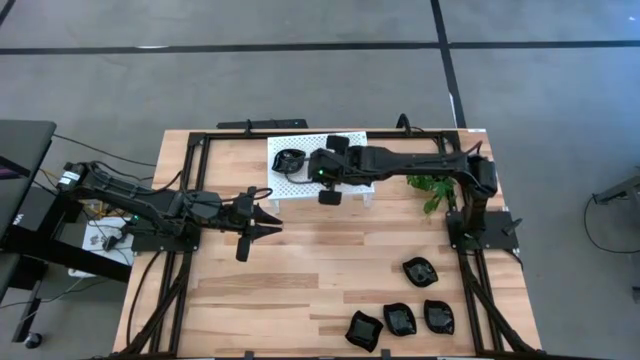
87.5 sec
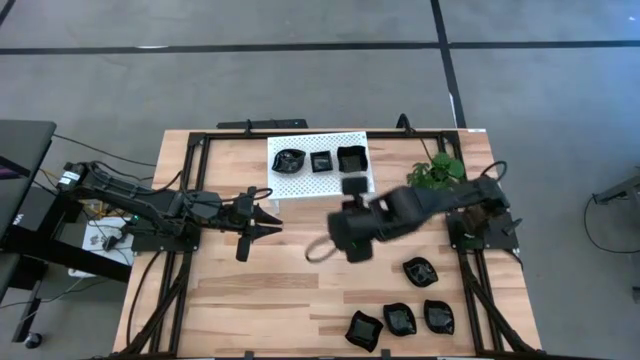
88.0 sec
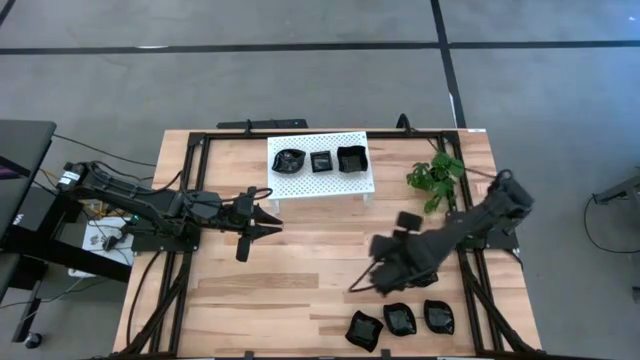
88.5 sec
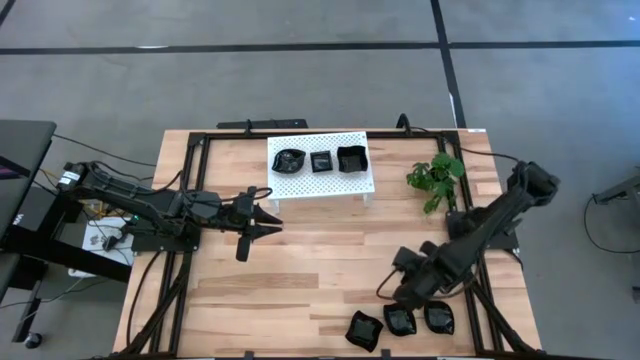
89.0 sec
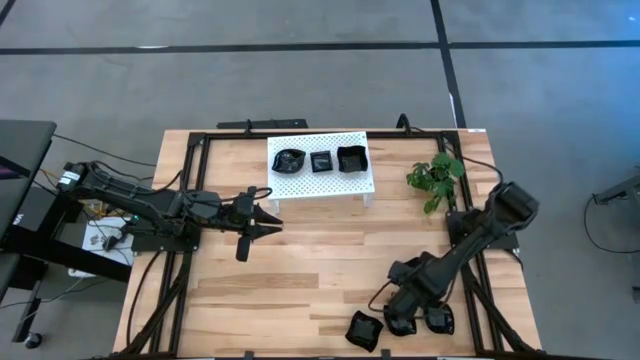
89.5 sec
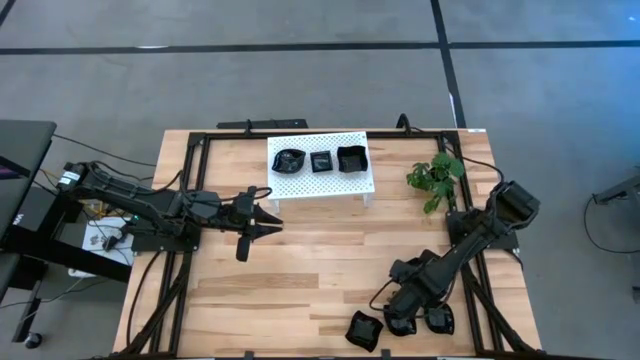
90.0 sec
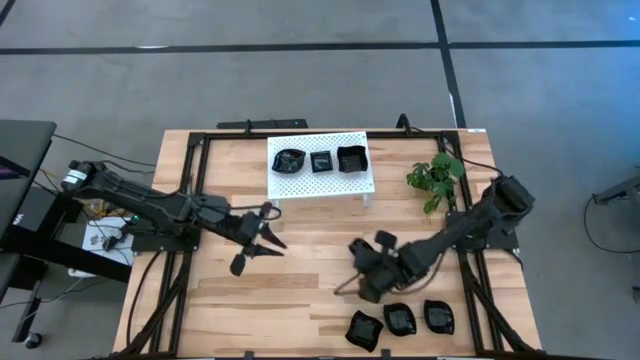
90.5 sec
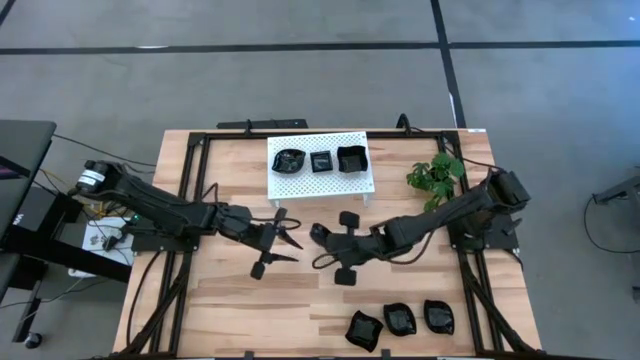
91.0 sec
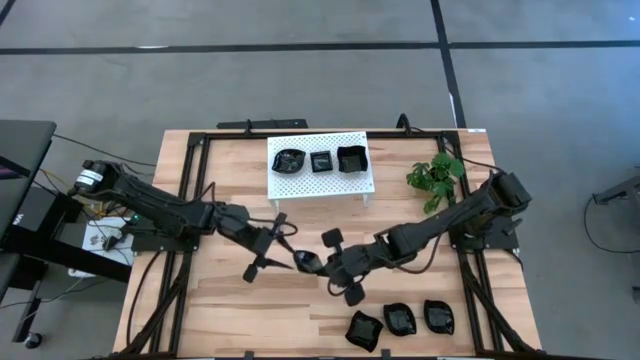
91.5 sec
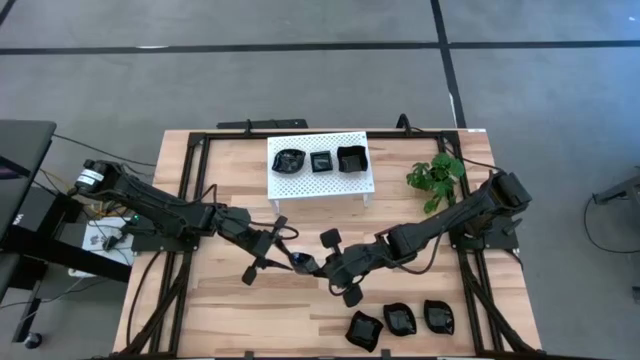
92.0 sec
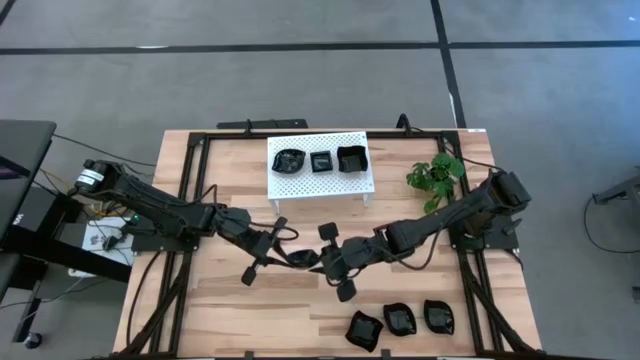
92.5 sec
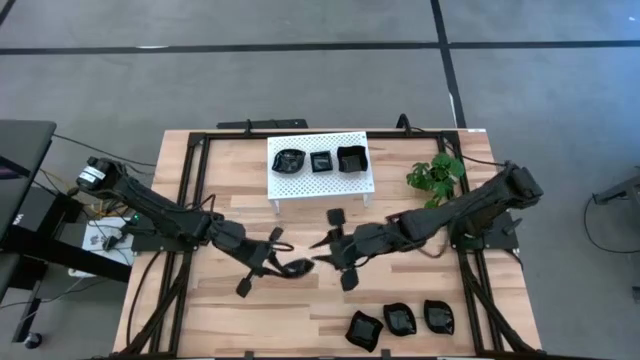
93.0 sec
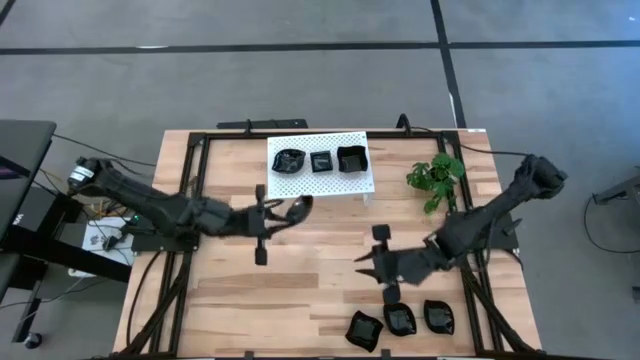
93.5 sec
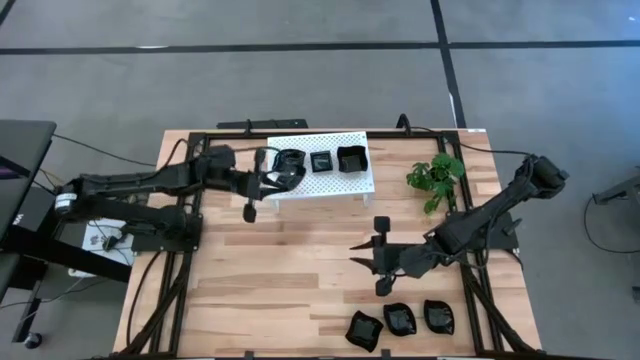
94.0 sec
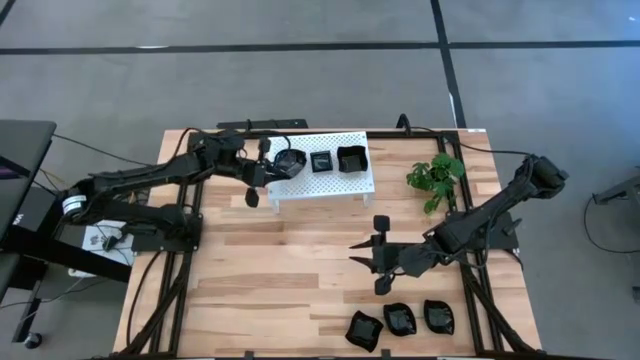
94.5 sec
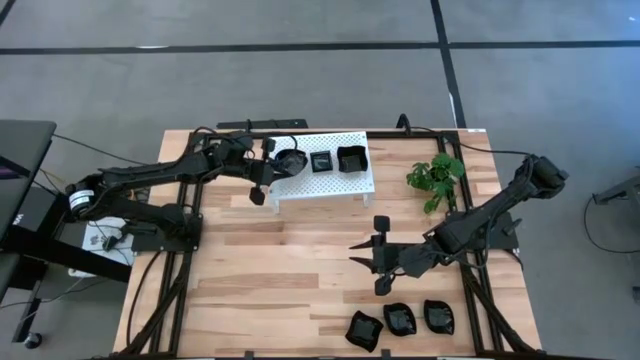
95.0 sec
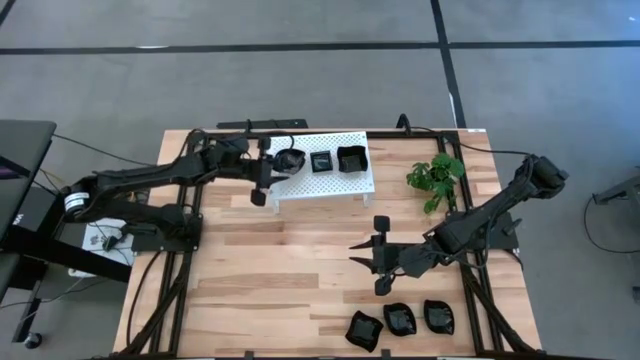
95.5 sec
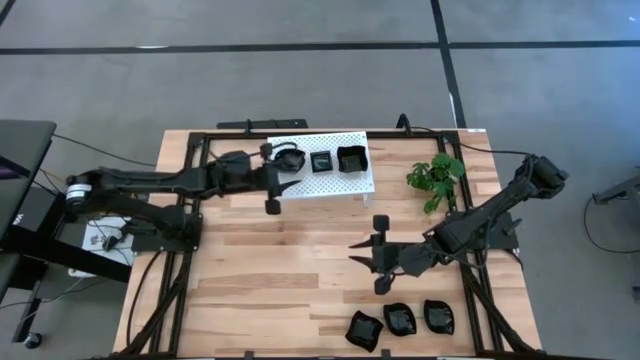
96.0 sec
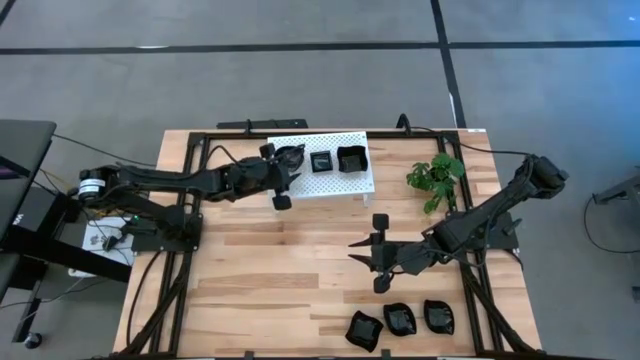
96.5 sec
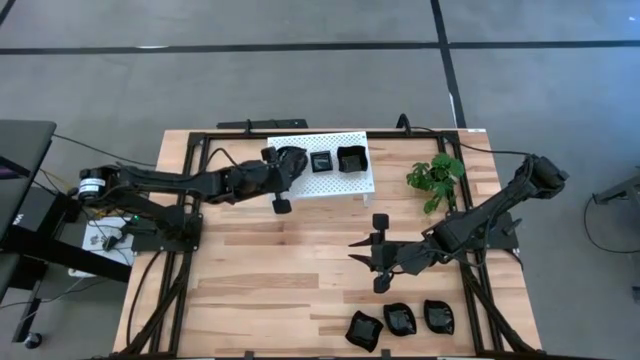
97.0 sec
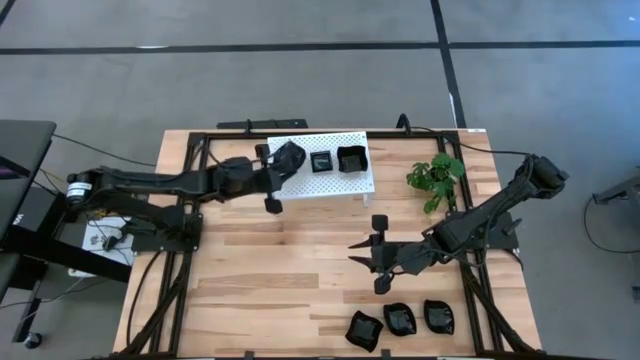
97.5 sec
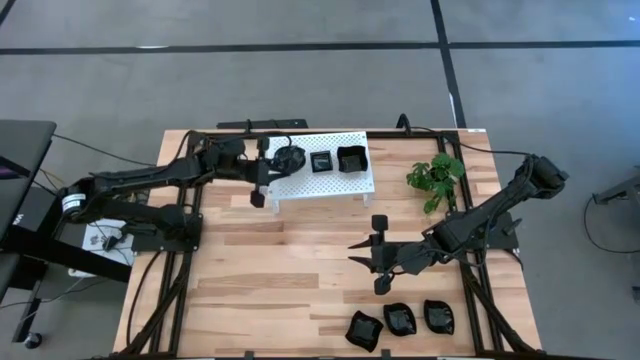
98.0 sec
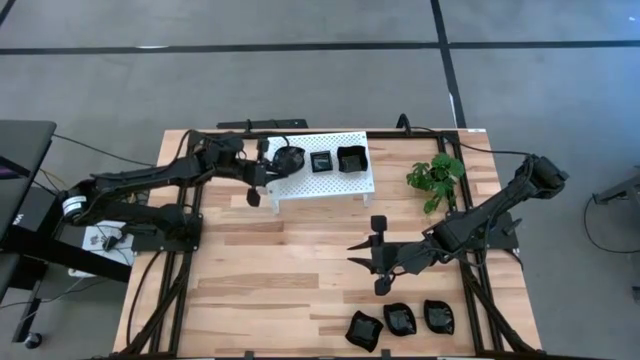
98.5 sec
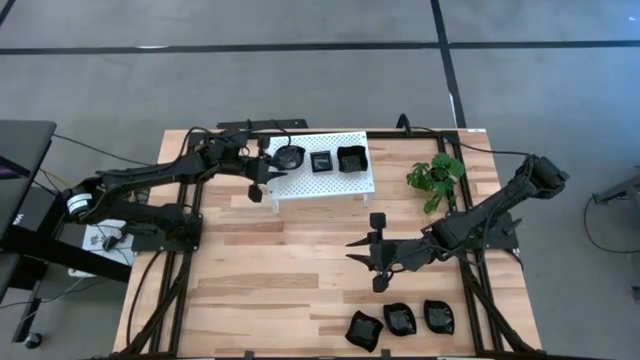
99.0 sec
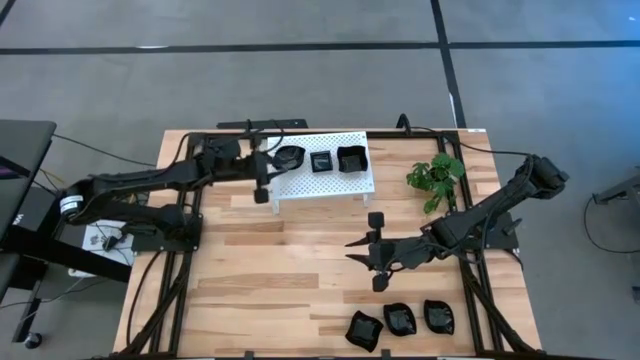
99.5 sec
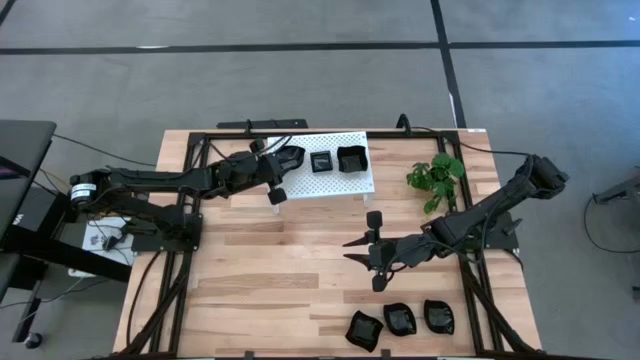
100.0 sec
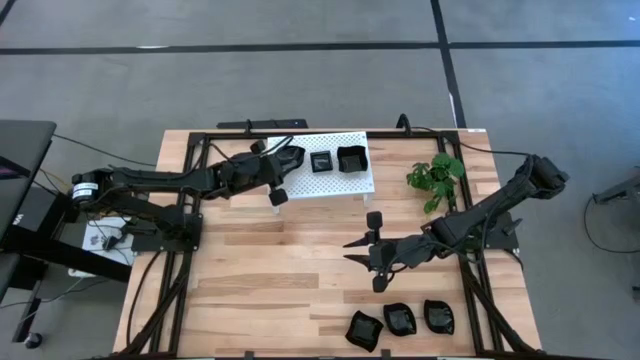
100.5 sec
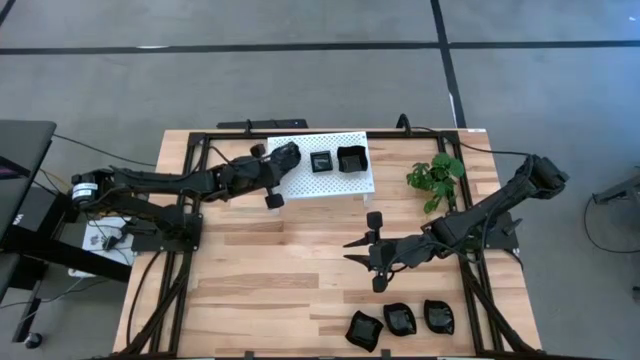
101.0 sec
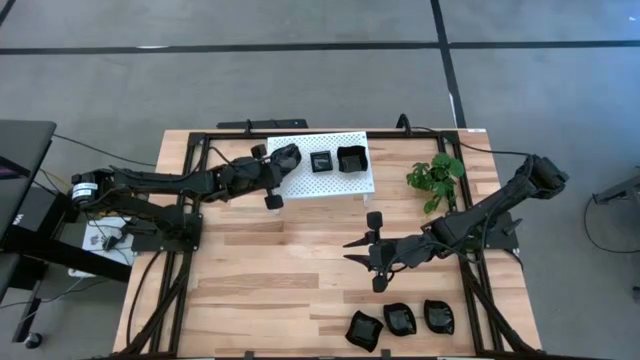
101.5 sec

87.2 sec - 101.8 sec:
Task: Pick & Place Mini shaped plates
Stack the leaf-shaped plate on top of the leaf-shaped plate on the shelf

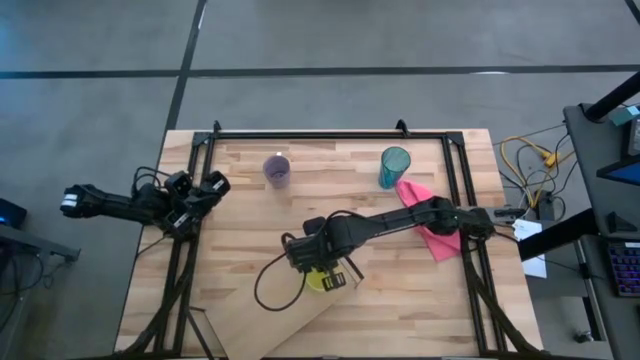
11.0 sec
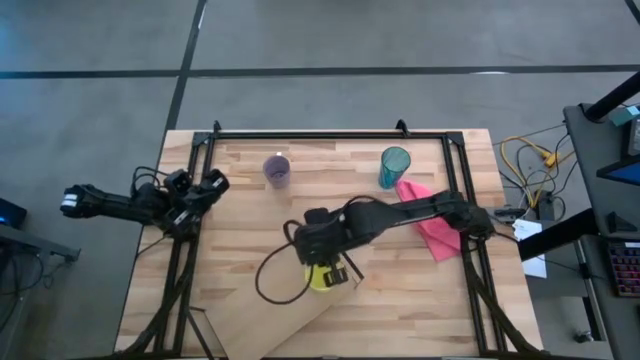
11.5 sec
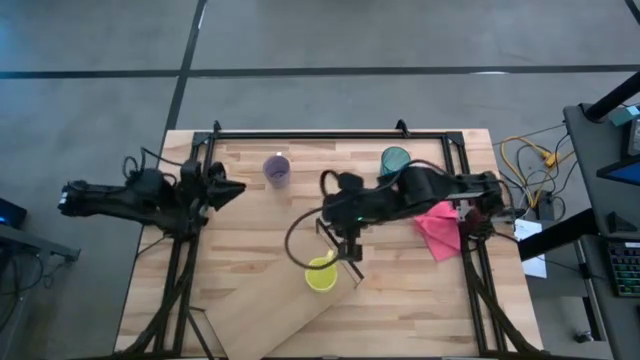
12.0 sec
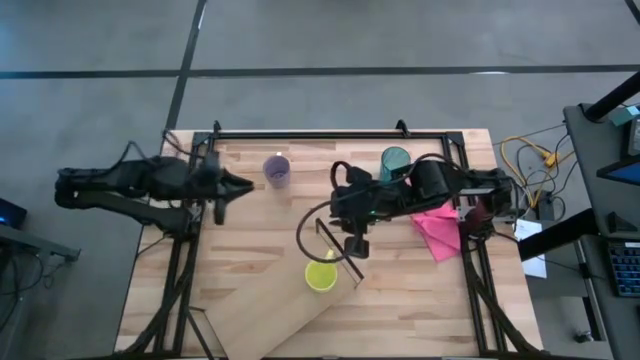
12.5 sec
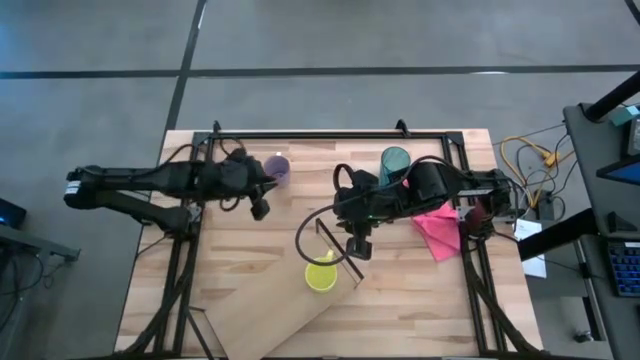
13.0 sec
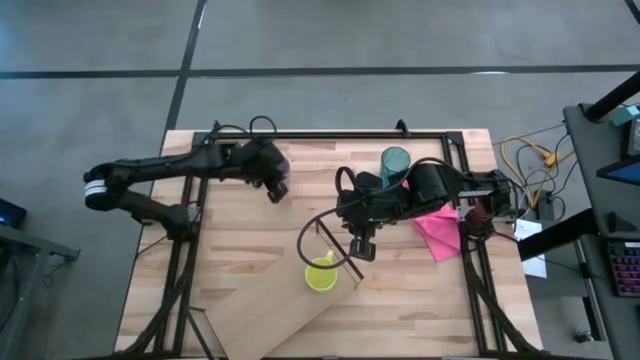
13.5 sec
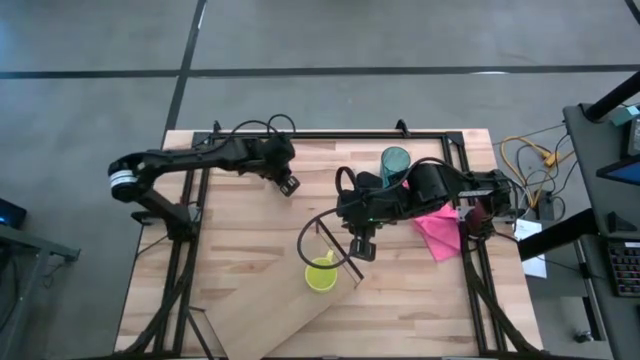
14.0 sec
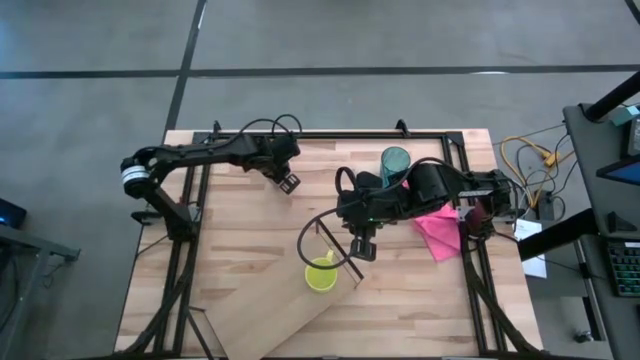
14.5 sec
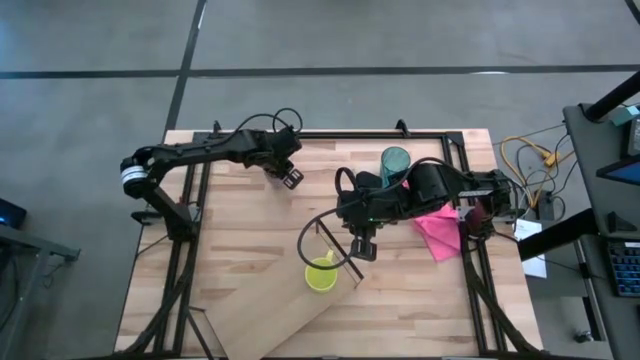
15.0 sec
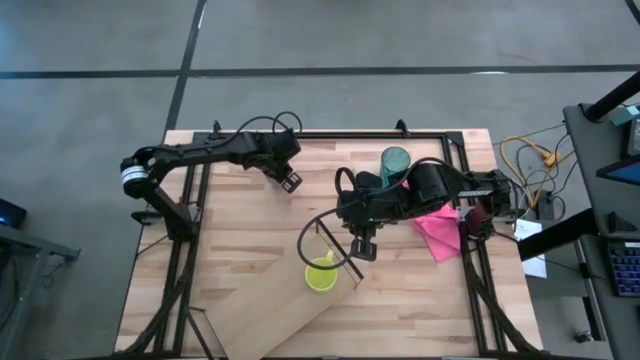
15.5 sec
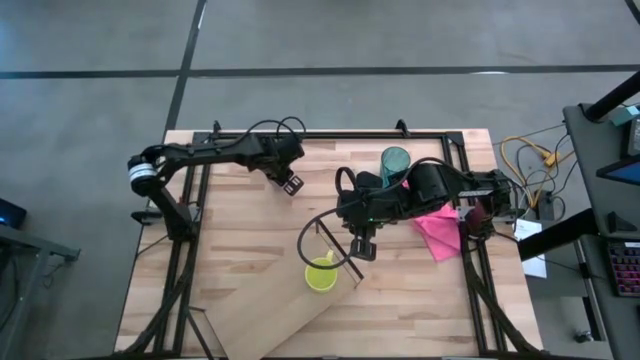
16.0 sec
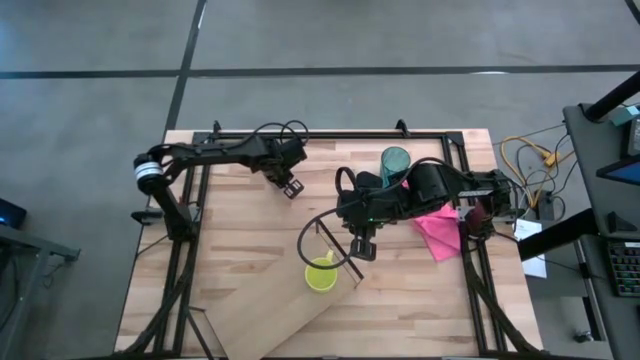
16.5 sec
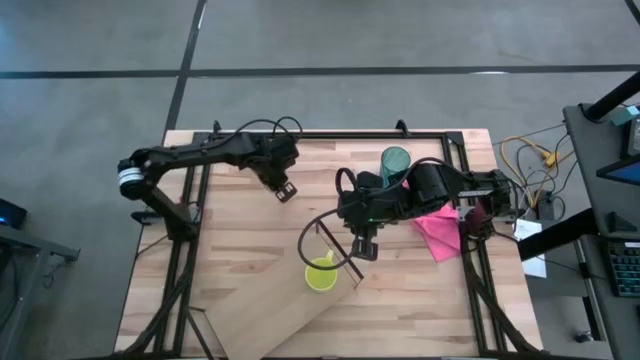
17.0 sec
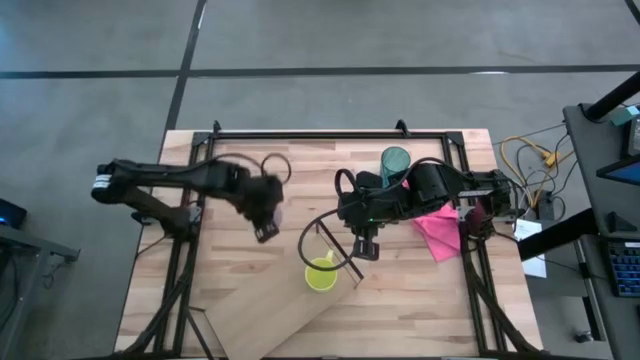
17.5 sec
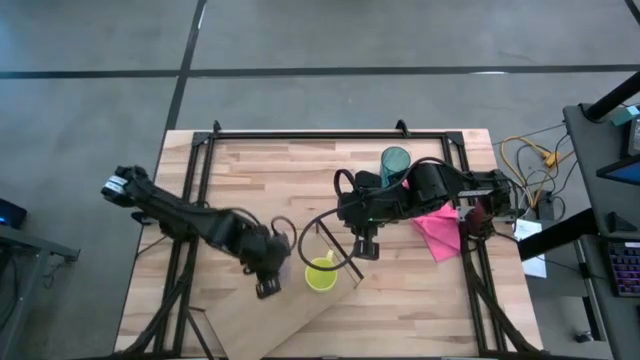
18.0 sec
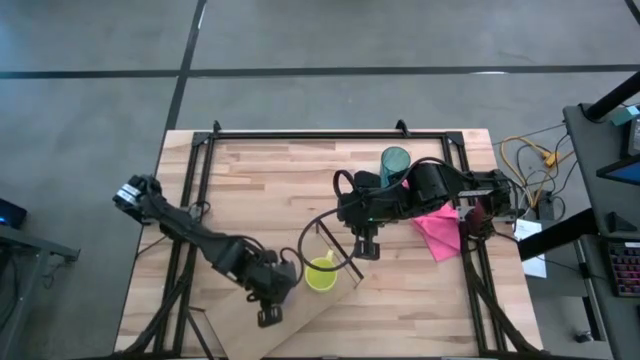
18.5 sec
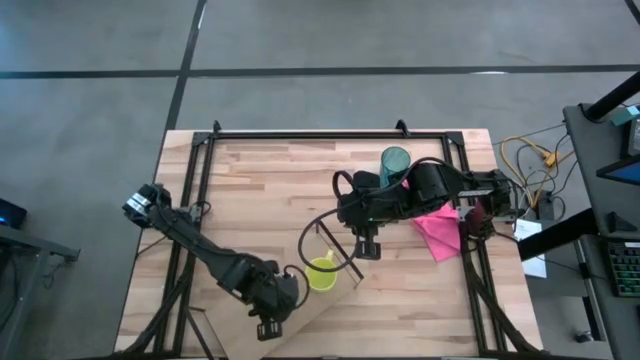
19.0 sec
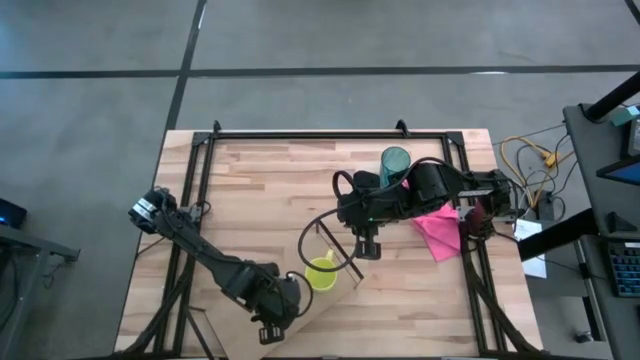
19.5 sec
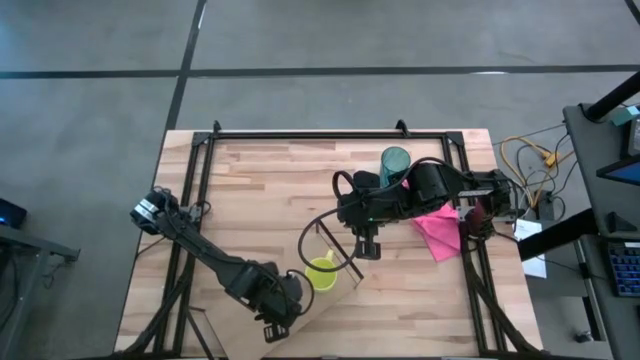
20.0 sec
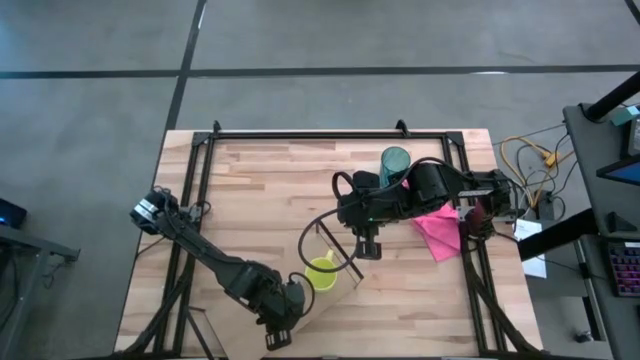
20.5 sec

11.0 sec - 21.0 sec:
Task: Stack small to large cups/mugs on shelf
Put the voilet mug on the shelf
